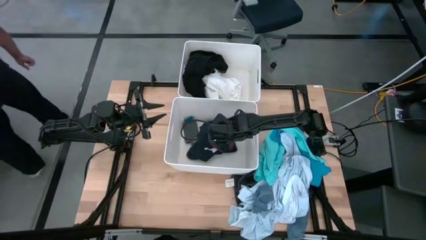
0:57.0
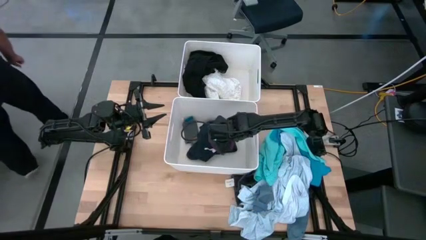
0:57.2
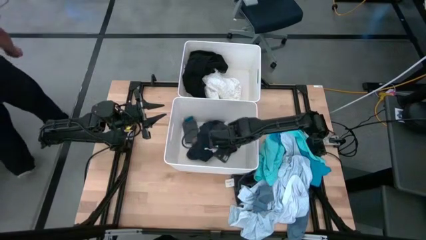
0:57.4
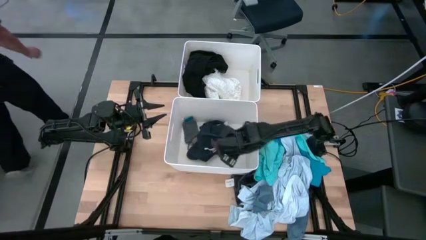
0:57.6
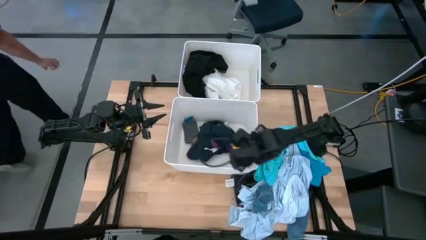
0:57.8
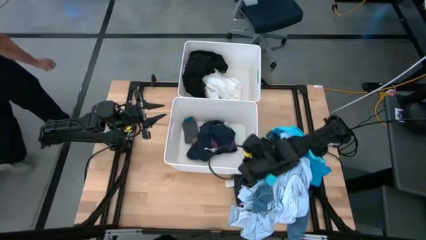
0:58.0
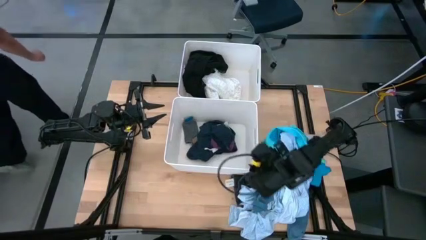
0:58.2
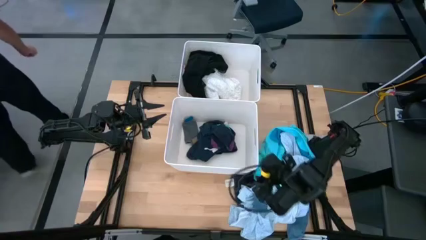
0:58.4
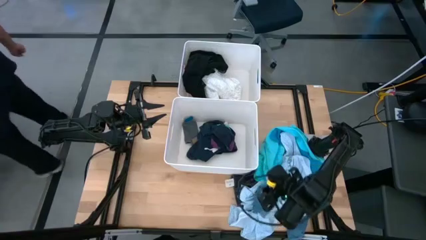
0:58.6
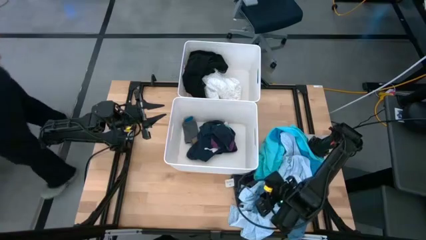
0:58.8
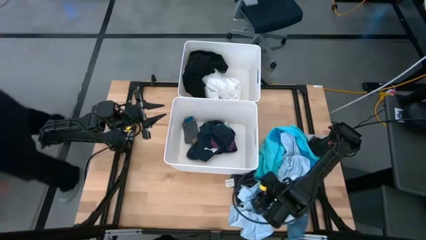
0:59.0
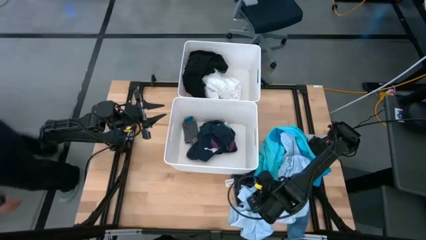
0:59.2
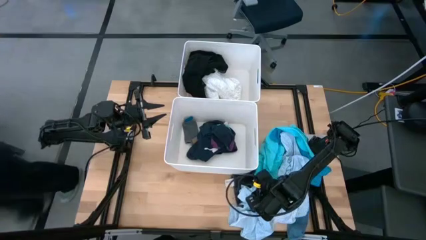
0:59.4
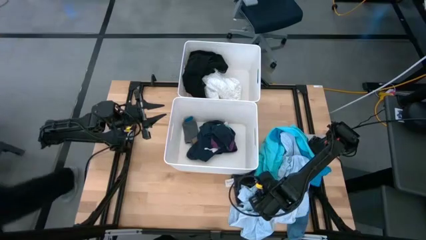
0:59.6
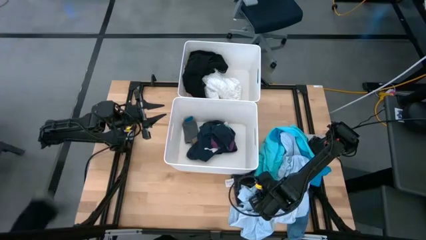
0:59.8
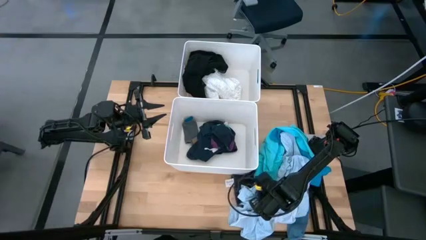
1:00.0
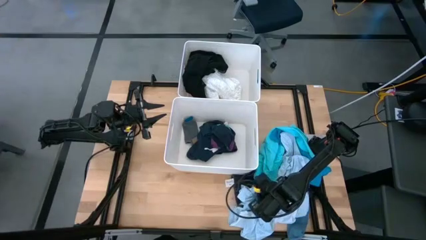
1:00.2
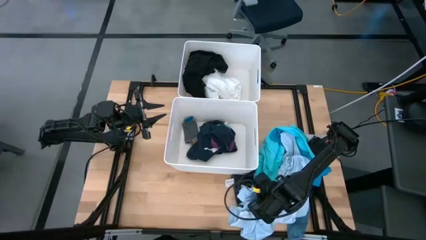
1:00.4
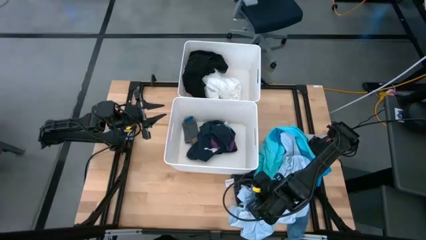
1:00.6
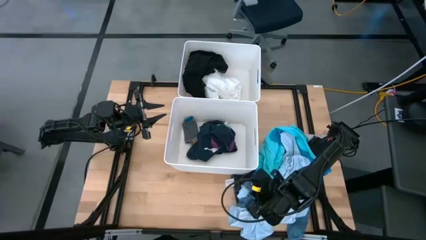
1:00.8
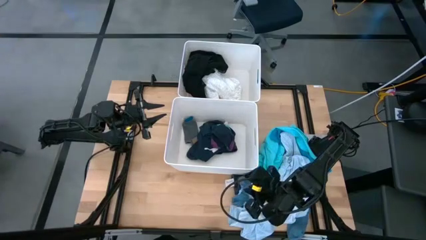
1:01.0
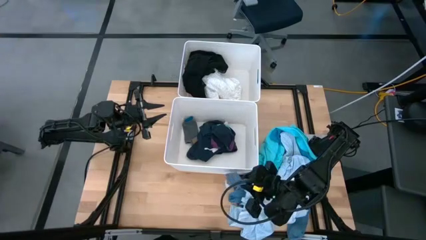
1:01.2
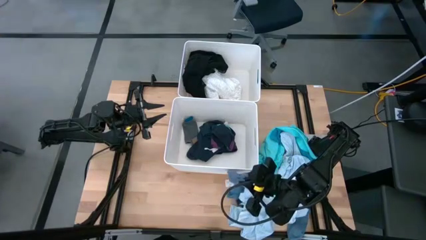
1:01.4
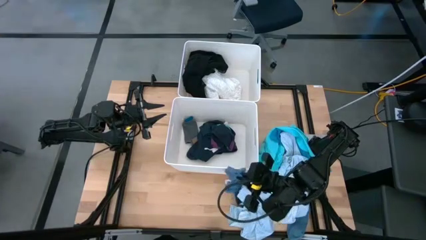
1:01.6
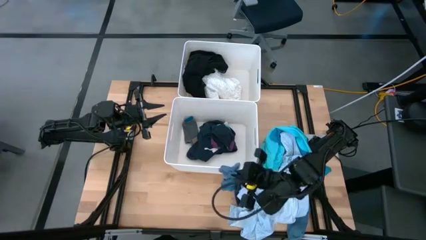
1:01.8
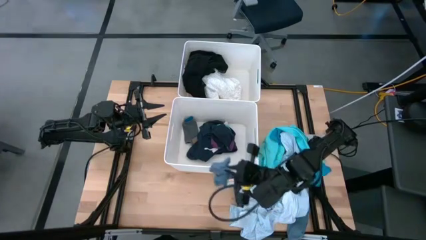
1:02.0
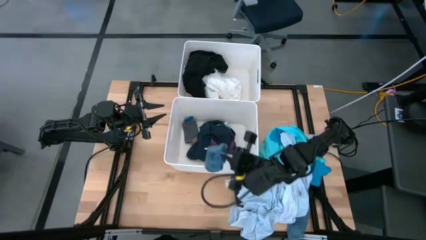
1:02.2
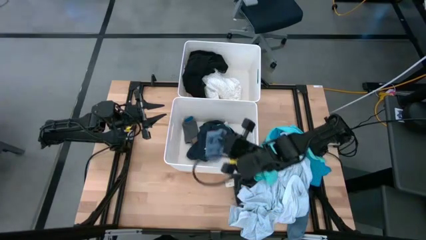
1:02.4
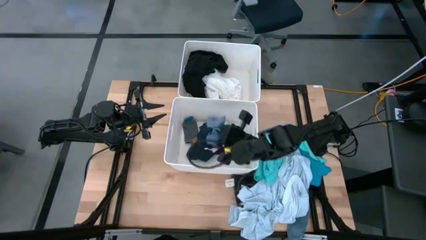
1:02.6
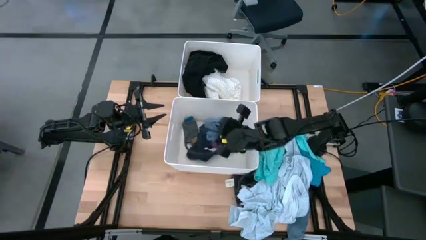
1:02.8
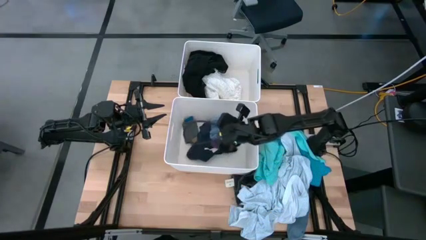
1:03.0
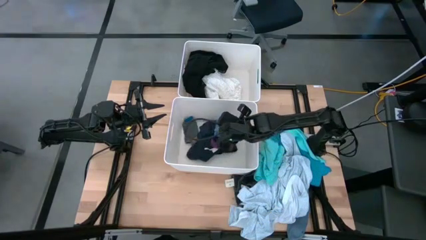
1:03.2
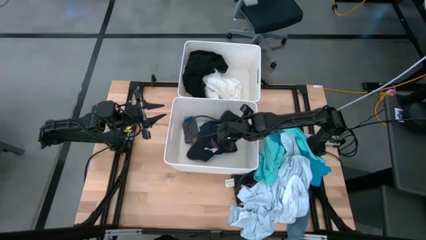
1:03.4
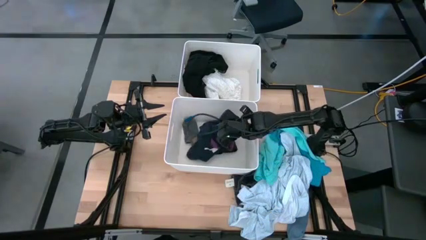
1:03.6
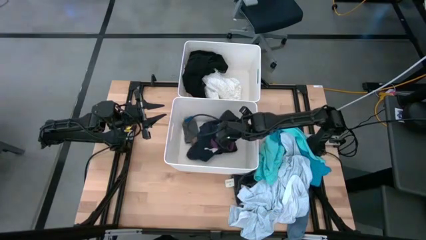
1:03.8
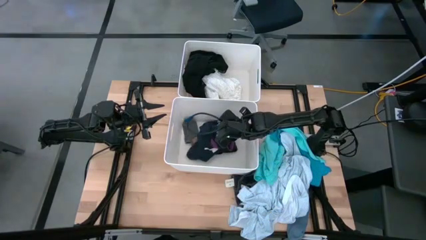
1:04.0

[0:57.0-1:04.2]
Task: Sort clothes
Put the left blue sock into the bottom white bin

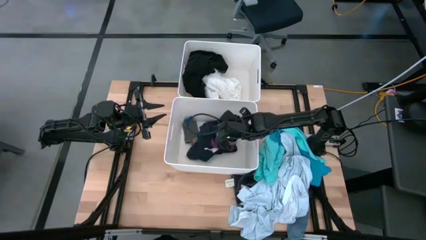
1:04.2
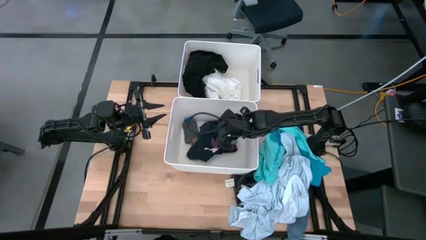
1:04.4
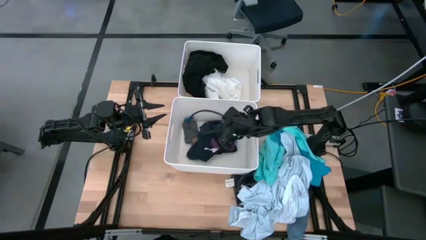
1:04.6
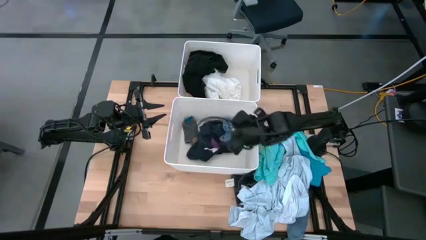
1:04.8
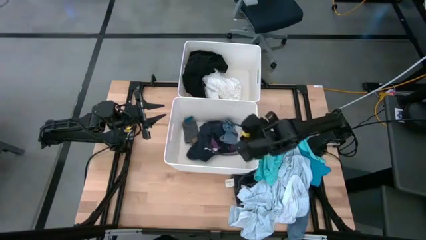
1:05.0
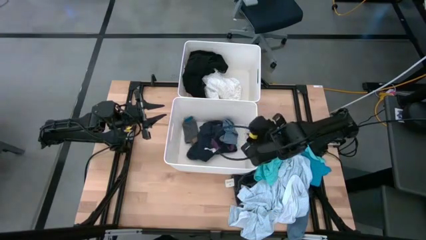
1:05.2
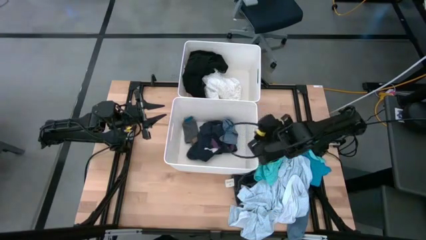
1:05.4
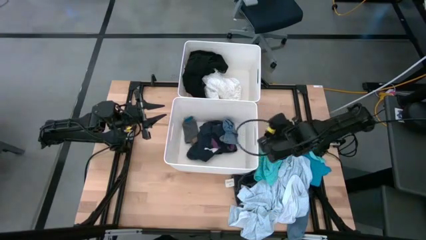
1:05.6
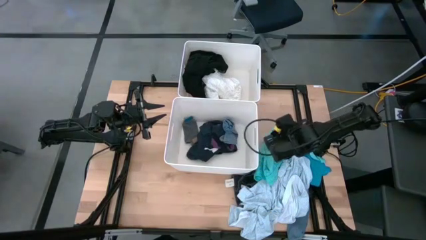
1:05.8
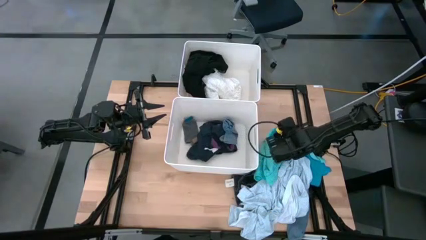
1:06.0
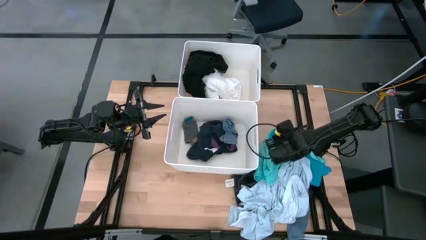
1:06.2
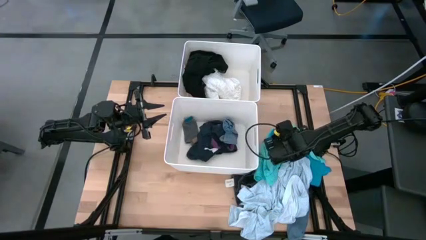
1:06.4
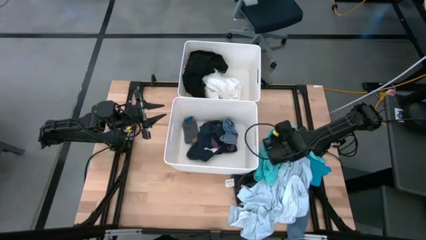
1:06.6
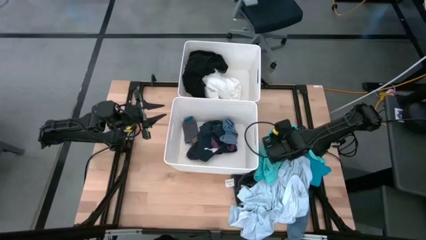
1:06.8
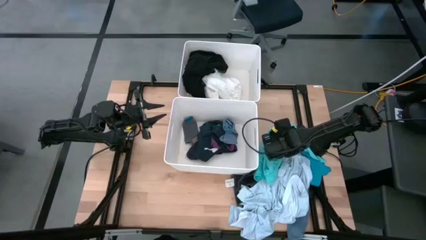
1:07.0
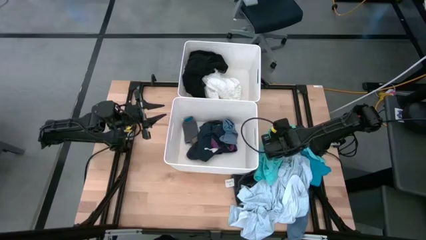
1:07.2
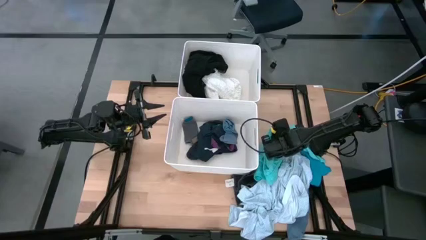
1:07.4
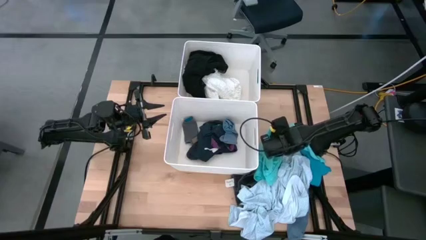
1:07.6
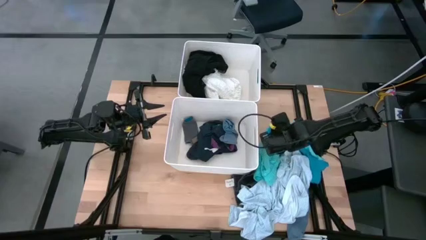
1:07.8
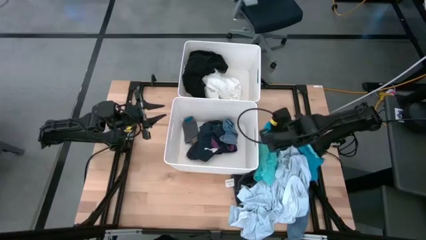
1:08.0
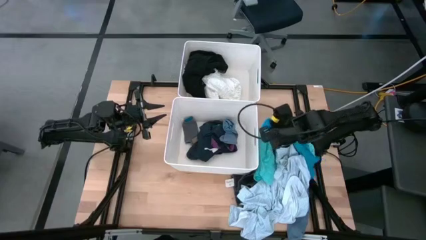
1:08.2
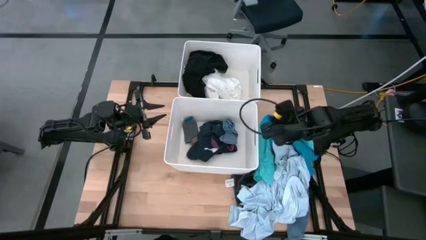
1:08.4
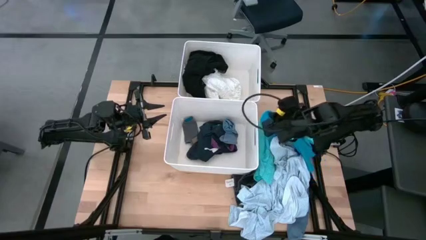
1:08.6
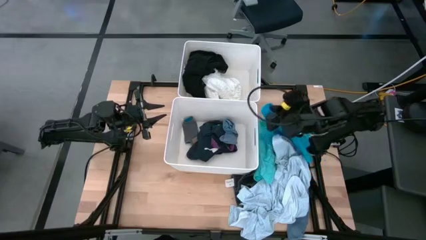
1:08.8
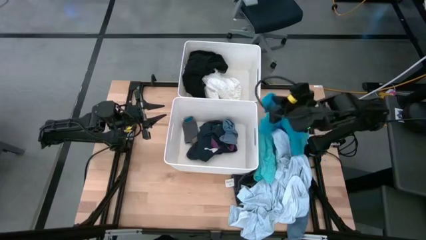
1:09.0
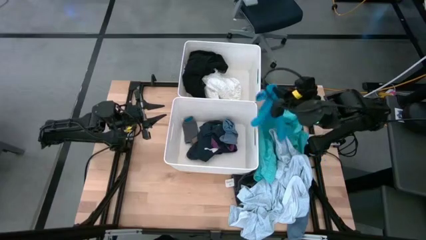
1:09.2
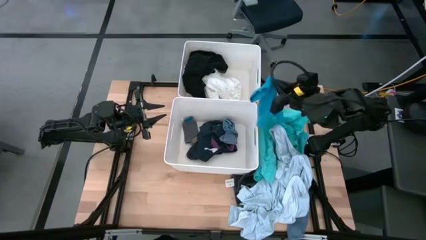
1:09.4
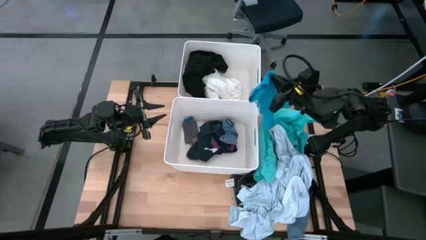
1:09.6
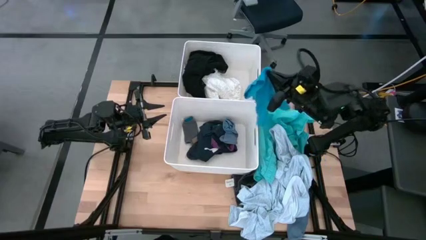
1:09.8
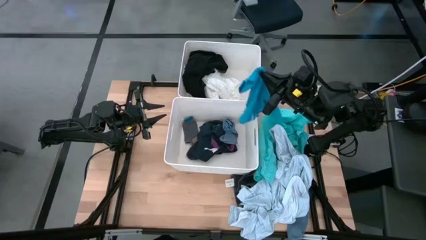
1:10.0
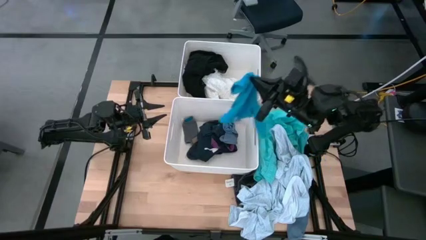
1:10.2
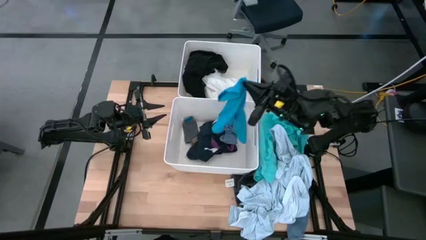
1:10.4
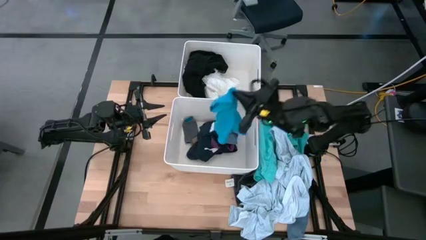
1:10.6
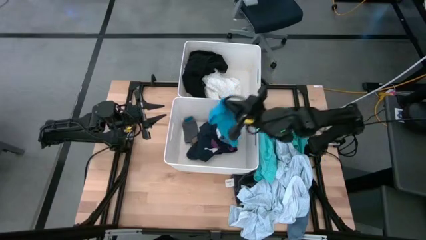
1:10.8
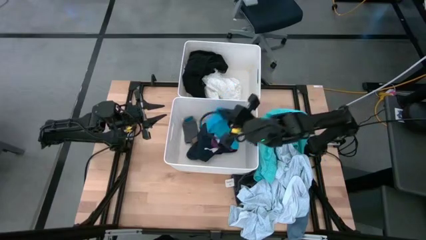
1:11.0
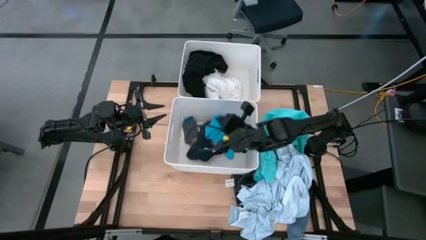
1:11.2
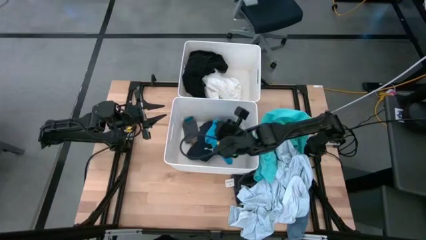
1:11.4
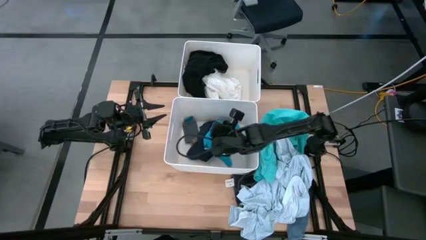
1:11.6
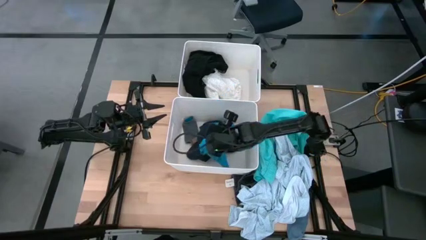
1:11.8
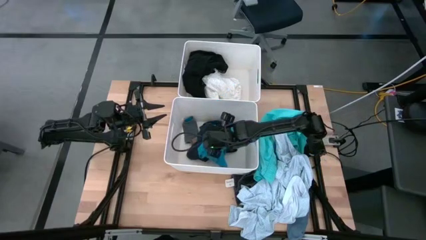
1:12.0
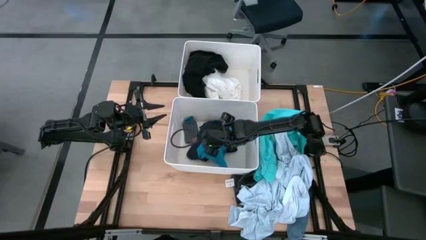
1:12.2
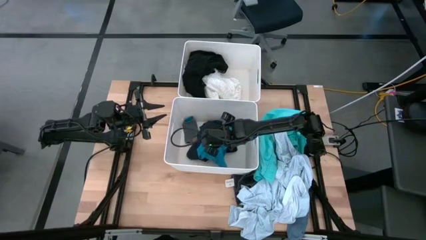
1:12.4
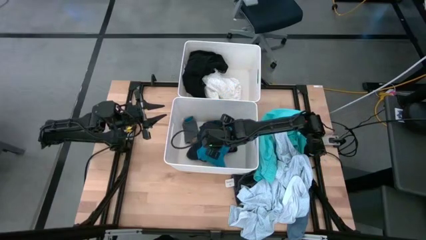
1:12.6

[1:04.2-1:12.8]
Put the blue shorts into the bottom white bin
